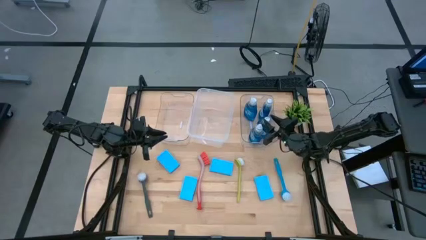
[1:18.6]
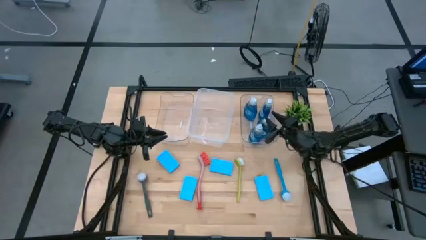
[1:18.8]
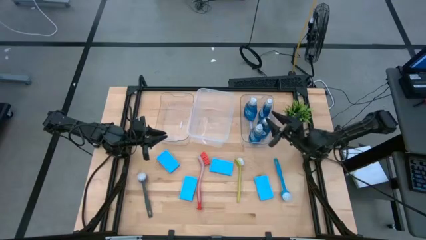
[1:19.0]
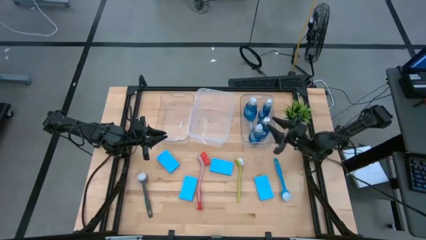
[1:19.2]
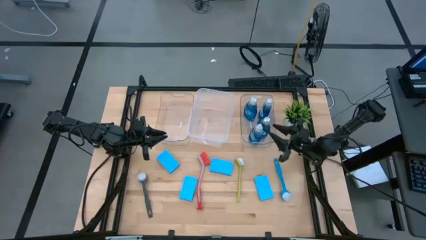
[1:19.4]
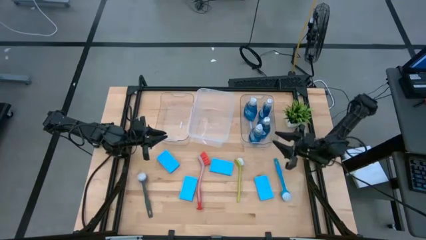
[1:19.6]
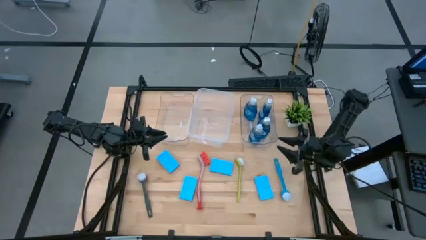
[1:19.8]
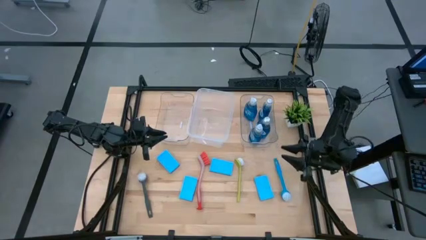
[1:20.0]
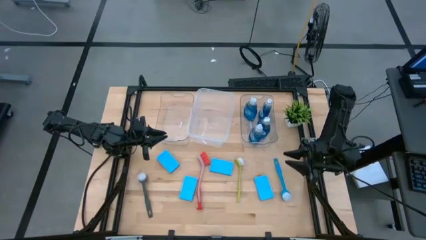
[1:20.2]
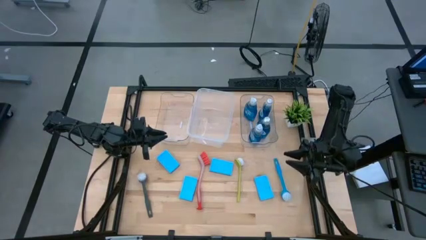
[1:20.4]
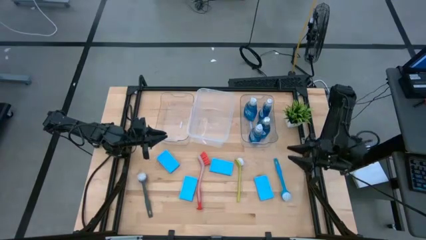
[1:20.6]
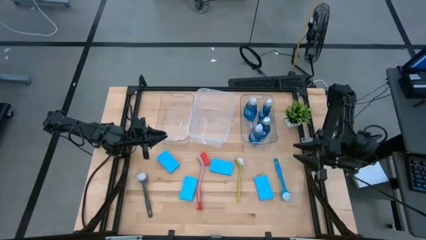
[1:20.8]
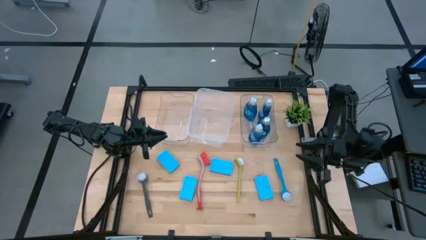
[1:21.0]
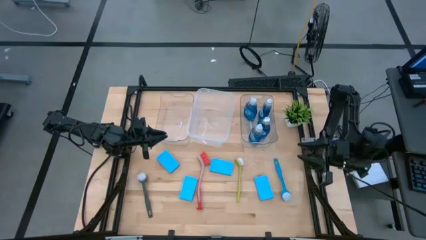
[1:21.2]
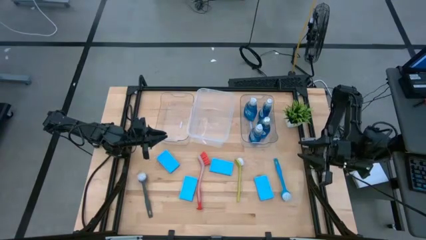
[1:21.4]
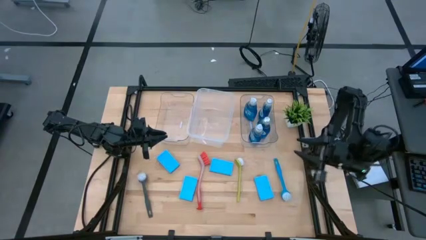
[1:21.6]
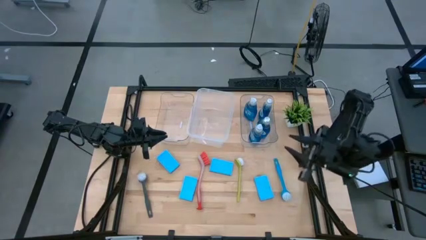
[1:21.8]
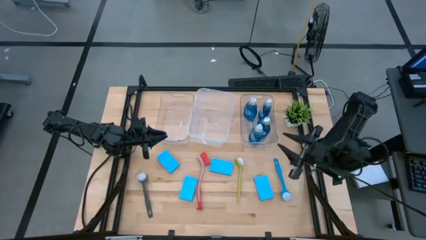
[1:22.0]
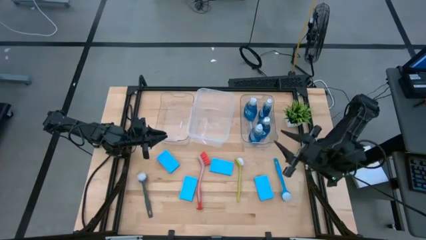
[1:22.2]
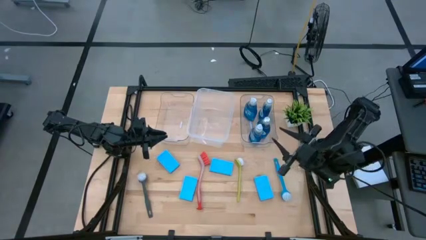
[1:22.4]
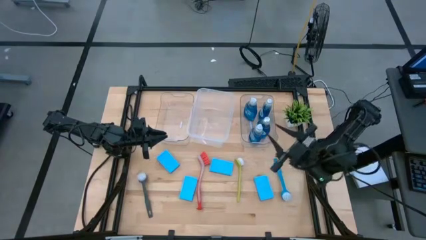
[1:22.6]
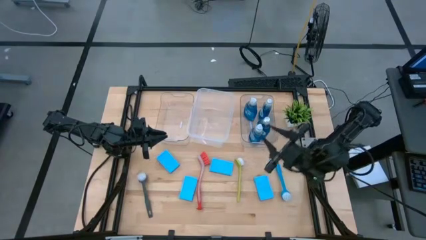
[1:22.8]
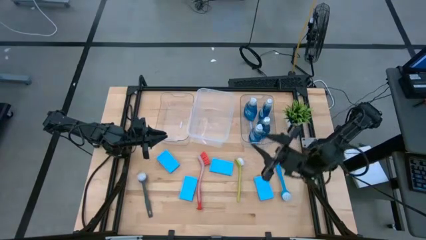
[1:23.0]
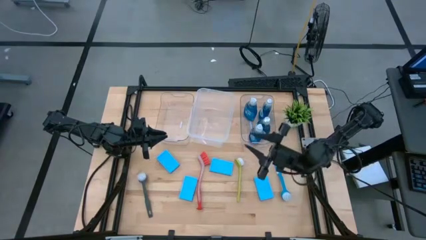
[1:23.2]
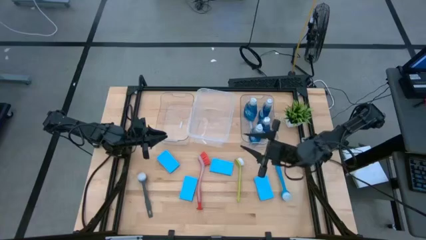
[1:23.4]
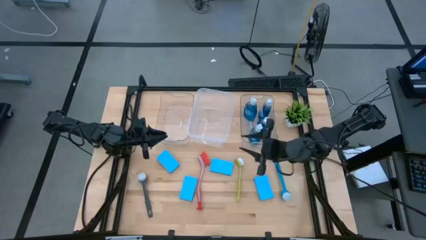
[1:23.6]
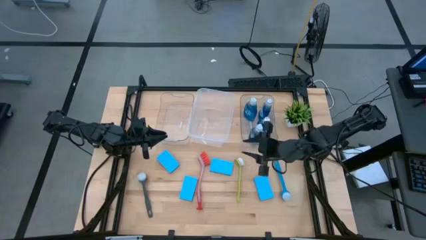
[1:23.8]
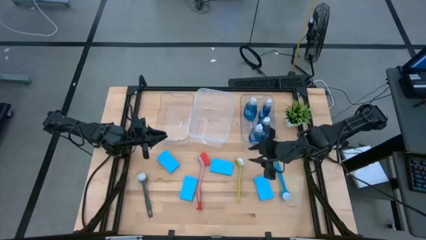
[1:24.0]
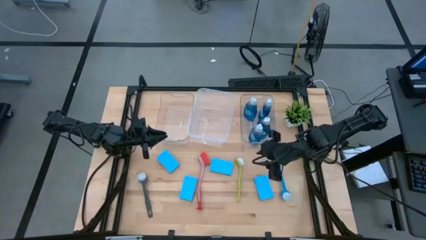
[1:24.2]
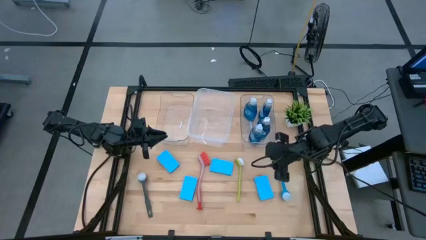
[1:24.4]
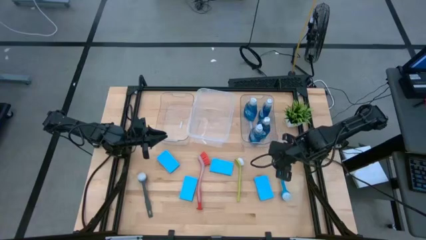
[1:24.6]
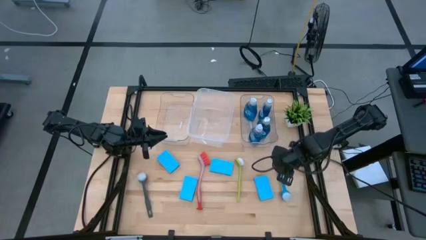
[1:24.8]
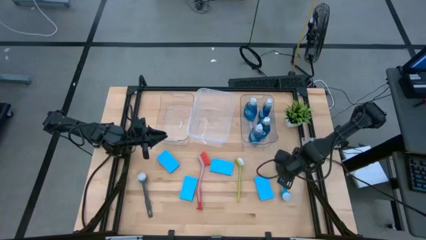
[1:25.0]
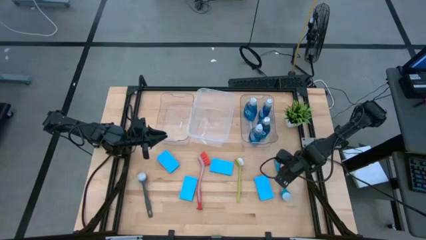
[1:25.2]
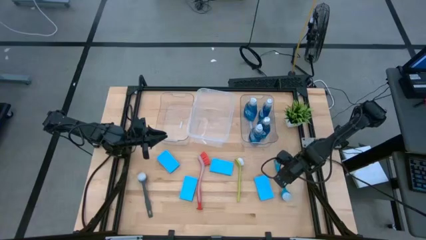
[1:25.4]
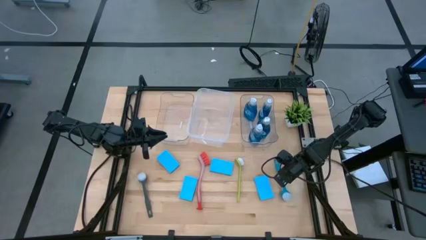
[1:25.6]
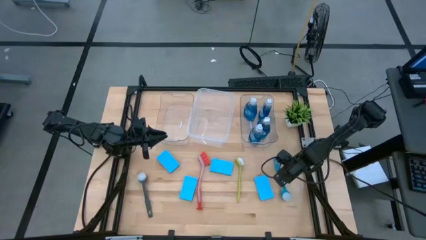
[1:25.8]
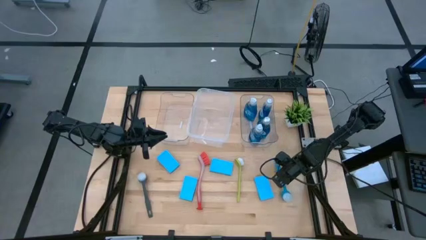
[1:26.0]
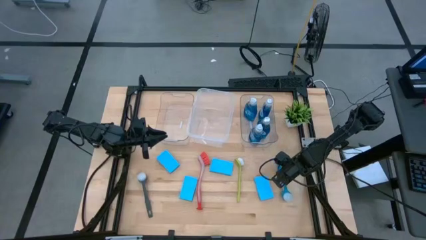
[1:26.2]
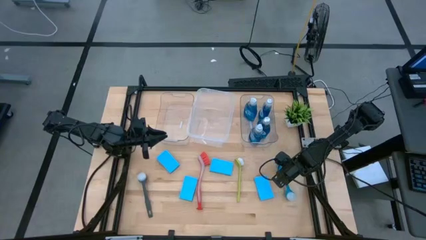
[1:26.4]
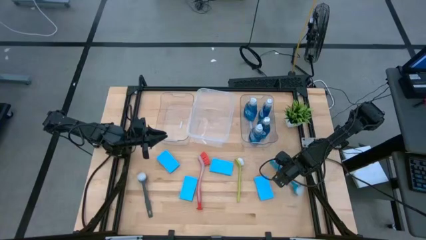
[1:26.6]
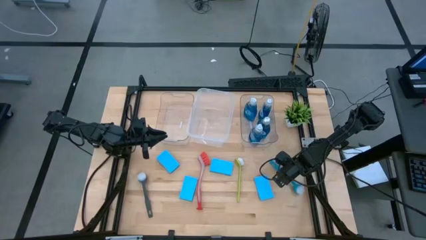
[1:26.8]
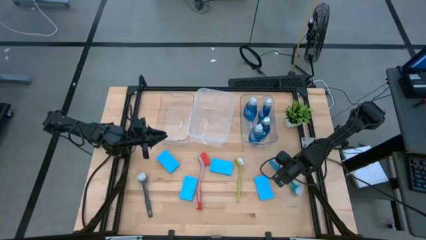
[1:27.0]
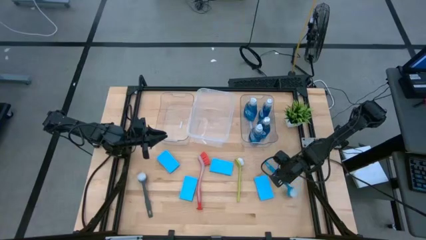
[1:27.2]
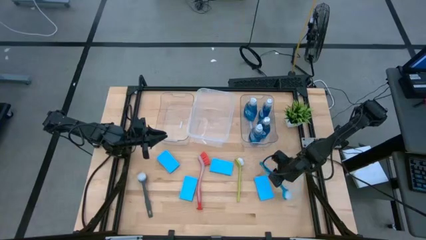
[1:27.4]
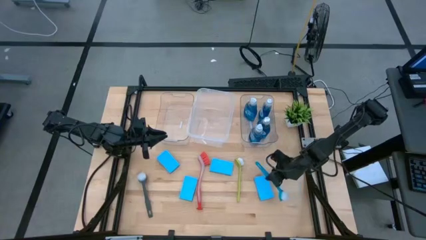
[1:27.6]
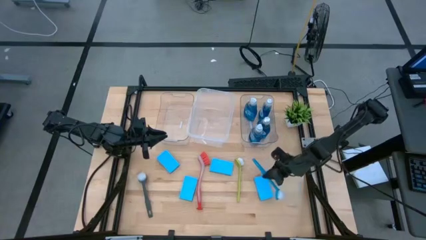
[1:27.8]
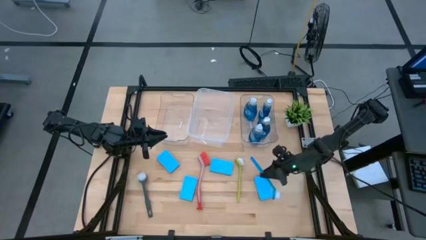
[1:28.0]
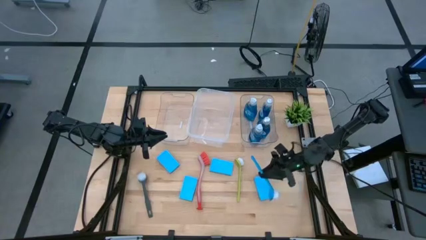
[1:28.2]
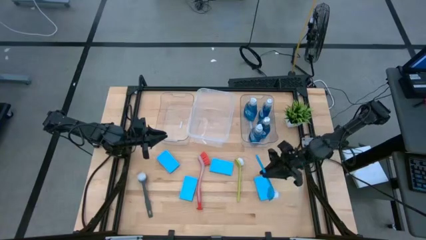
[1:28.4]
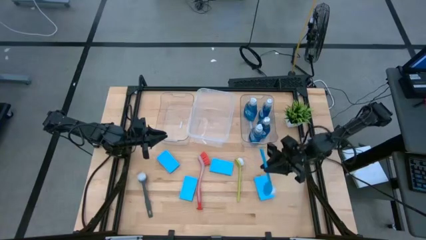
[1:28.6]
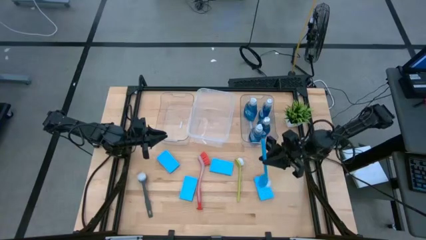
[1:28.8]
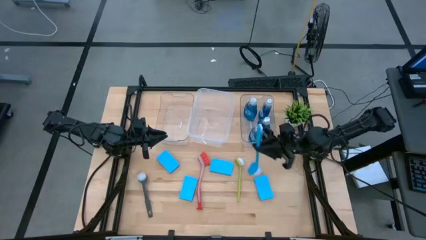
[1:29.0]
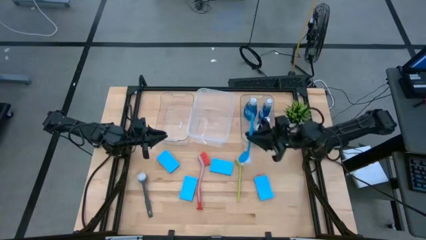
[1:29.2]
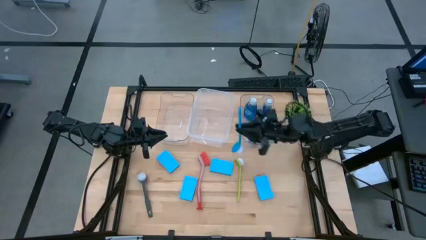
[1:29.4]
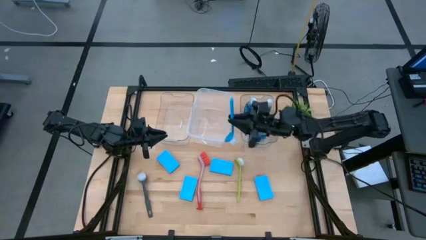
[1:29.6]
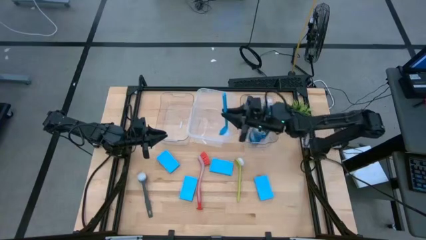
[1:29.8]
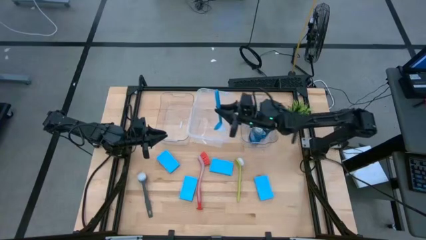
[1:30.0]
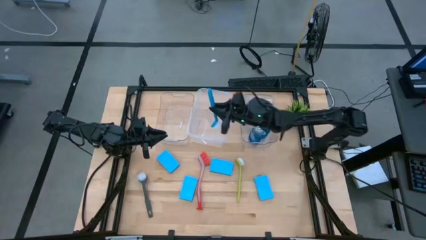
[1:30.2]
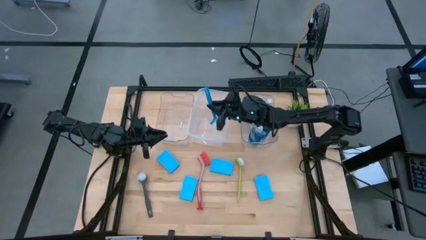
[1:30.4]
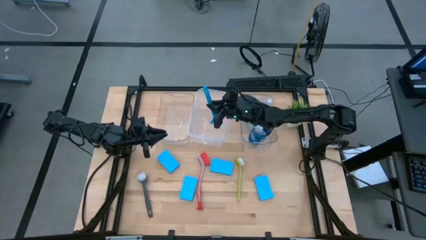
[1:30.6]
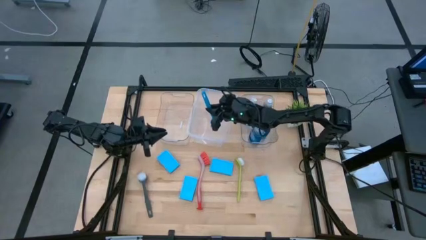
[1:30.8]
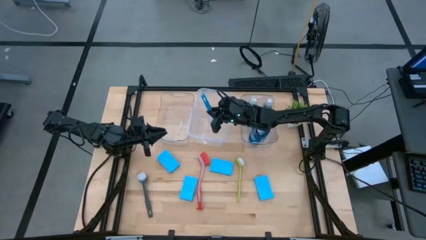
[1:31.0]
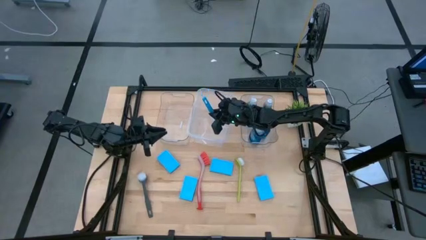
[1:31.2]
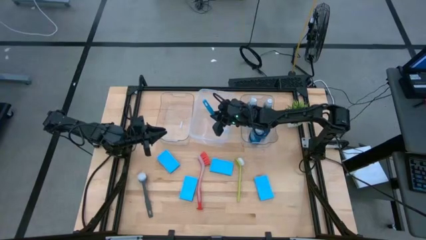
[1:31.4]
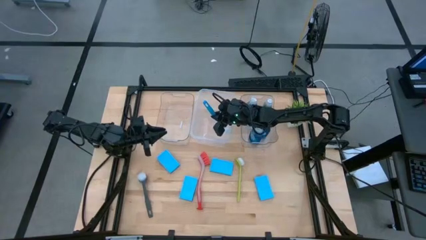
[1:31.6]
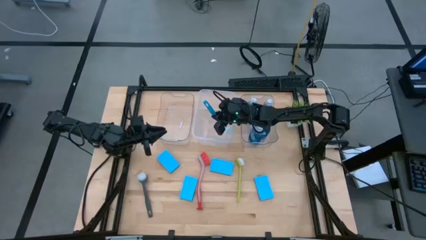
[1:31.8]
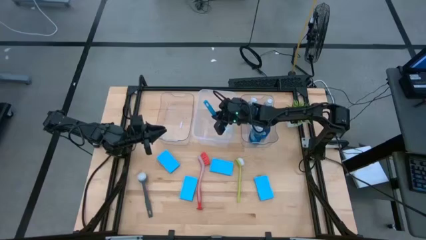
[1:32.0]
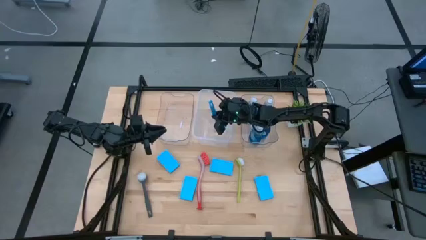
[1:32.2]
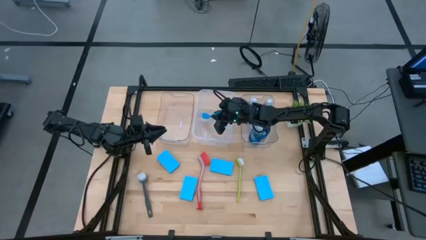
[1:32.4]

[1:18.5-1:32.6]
Task: Pick & Place Kitchen Sink Supplies
Put the blue toilet brush into the middle transparent bin
